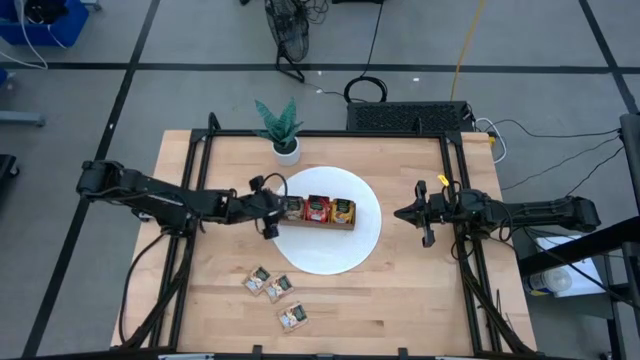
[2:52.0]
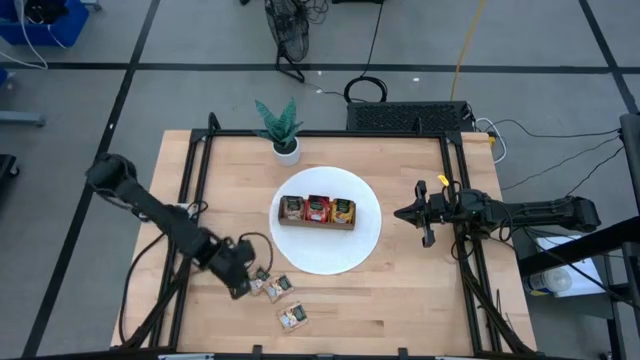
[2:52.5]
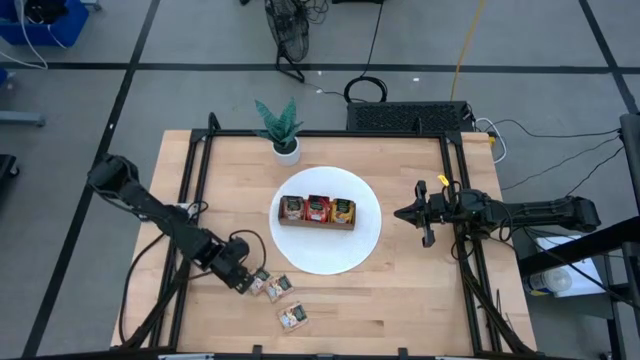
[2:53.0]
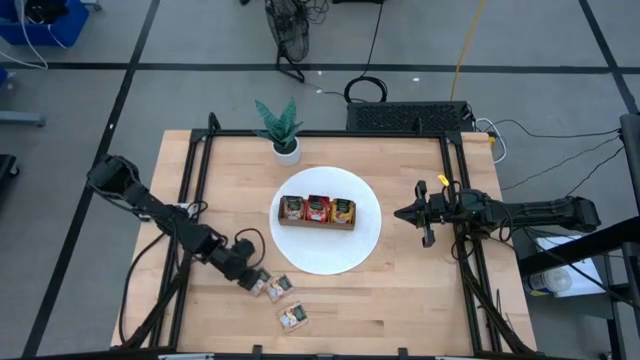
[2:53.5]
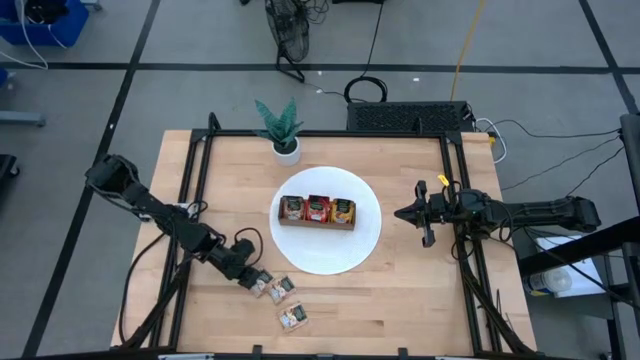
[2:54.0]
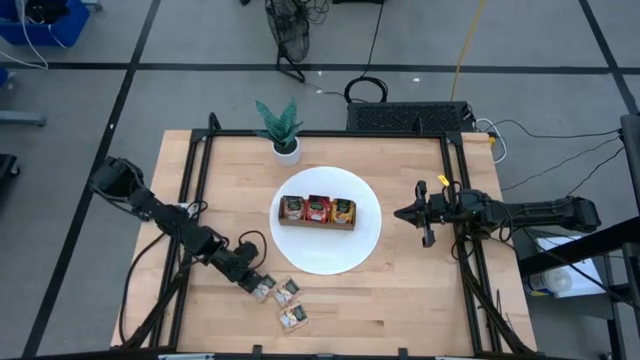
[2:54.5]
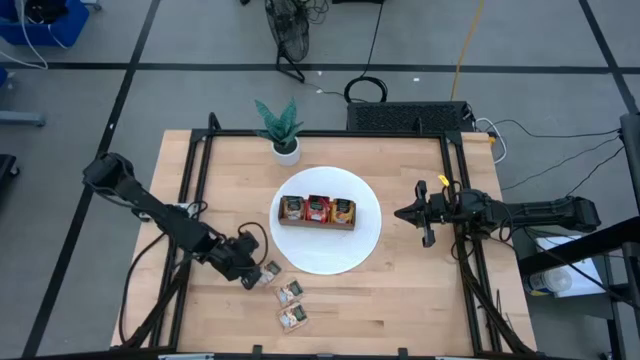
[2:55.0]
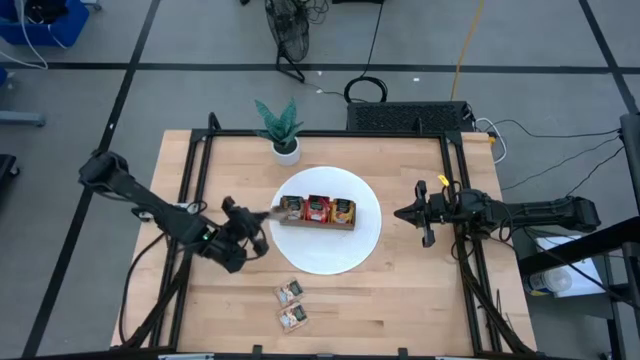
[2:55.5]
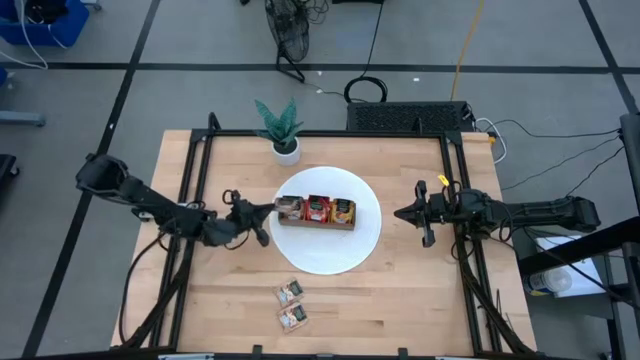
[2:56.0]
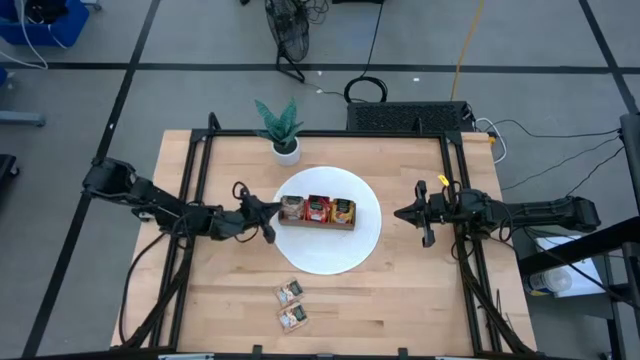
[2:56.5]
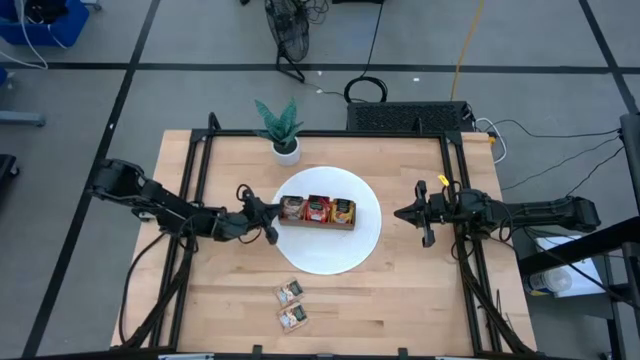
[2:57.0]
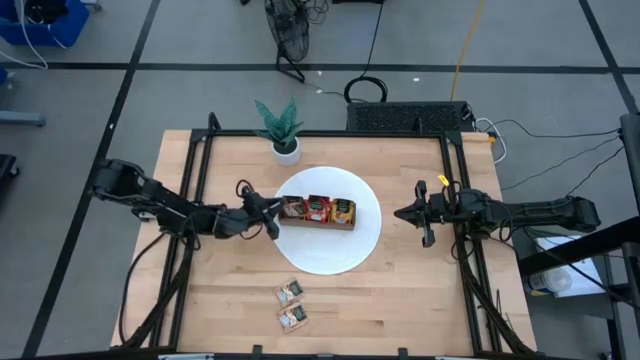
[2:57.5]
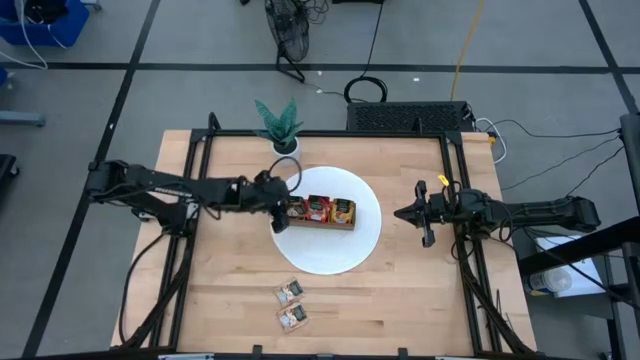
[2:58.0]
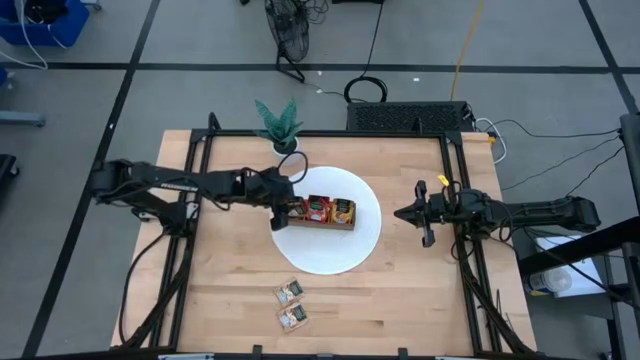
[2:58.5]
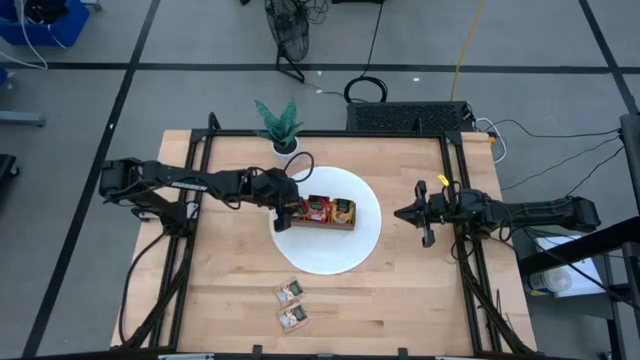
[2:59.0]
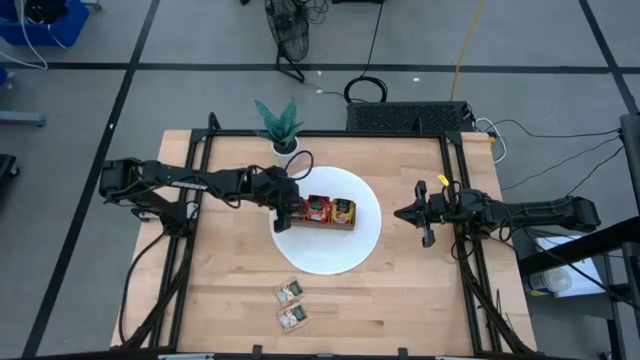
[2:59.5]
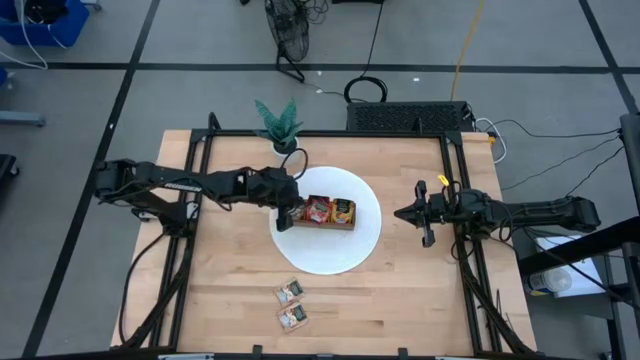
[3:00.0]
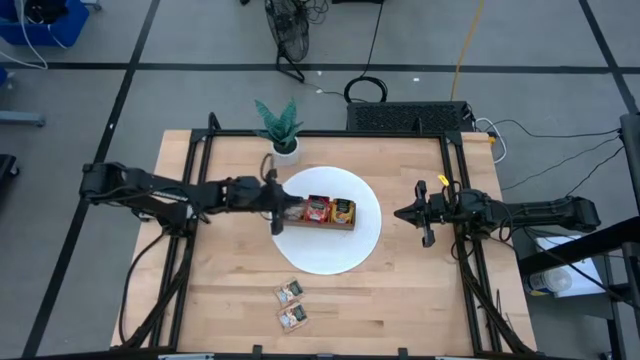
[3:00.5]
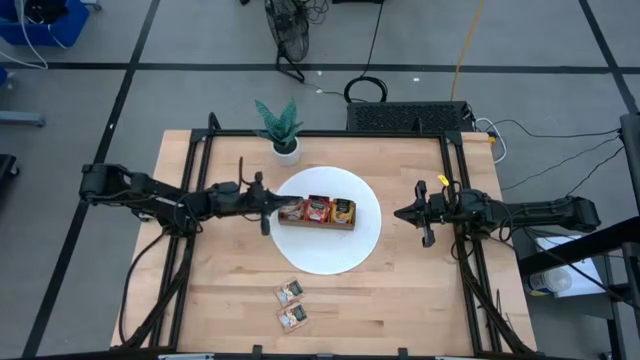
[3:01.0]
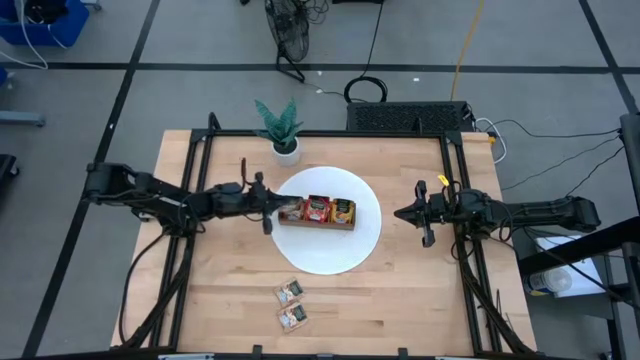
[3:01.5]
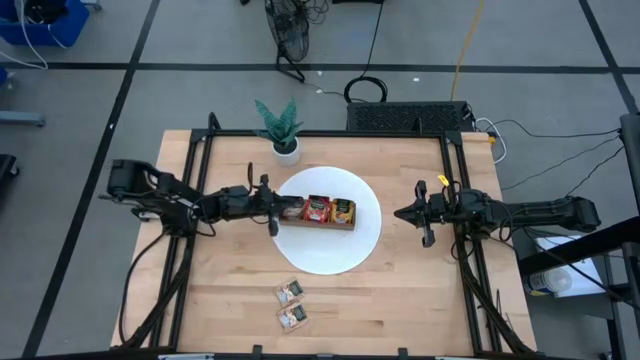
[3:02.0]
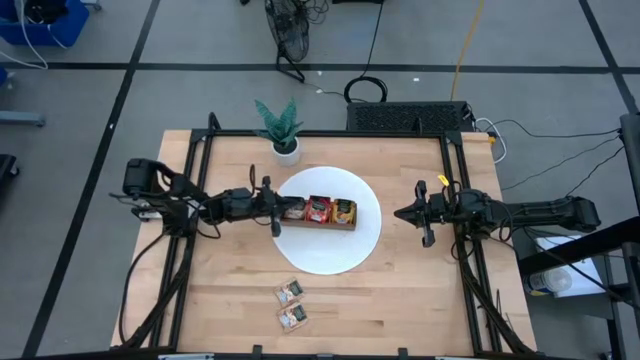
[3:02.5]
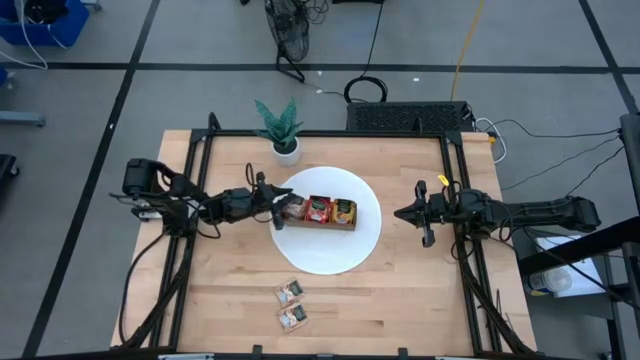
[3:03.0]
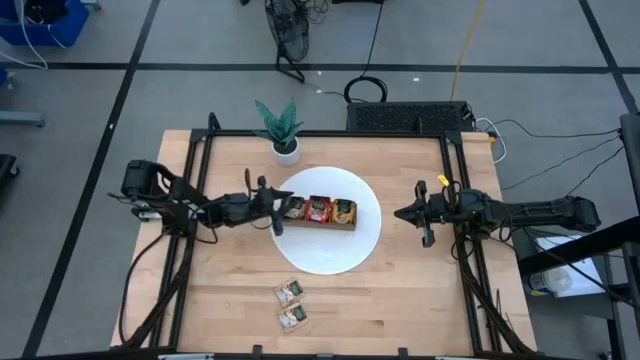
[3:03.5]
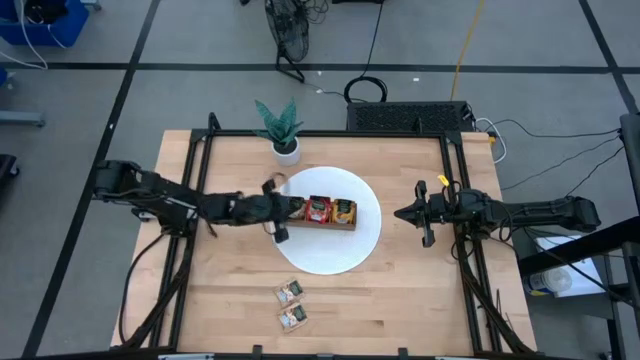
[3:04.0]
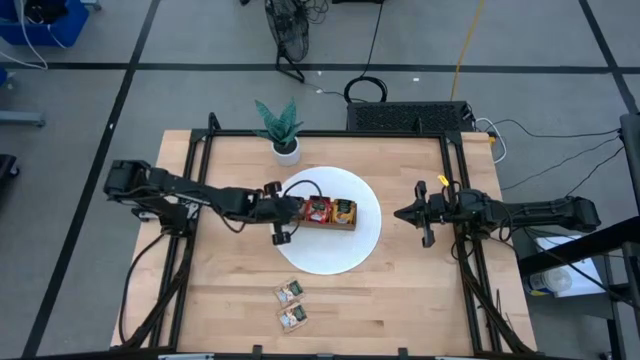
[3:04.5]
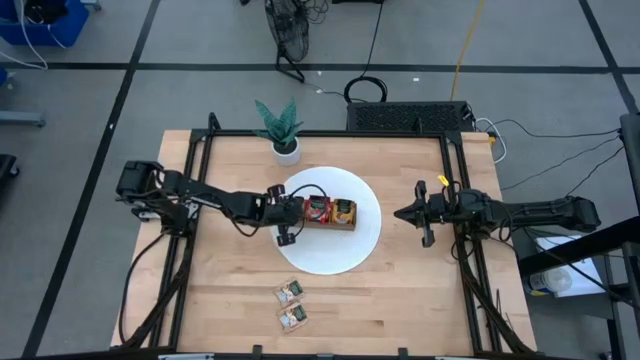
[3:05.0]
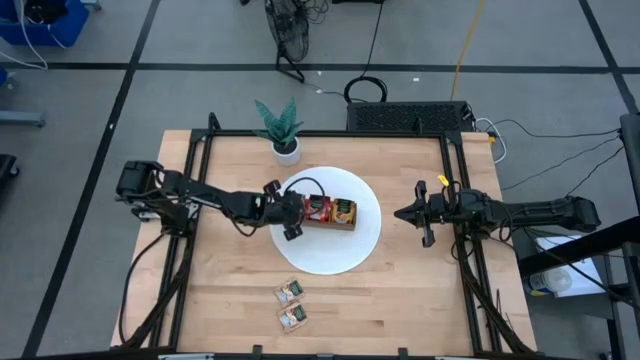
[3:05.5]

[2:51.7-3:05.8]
Task: Pick & Place Tea
Put the brown tea bag into the left section of the wooden organizer

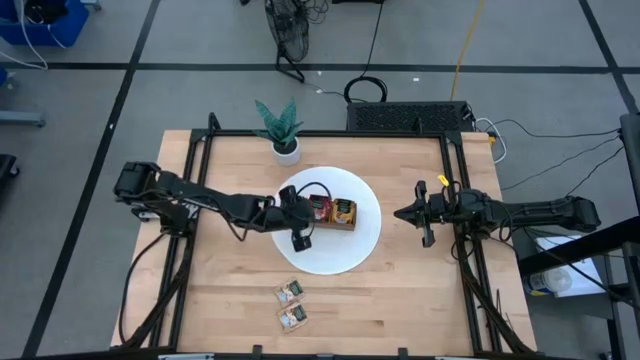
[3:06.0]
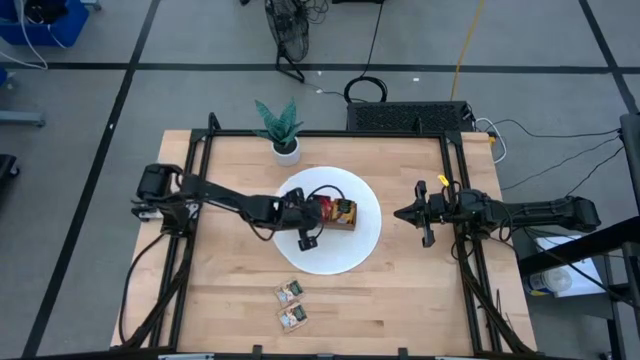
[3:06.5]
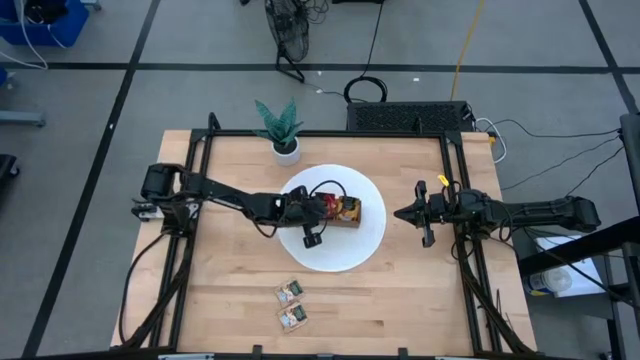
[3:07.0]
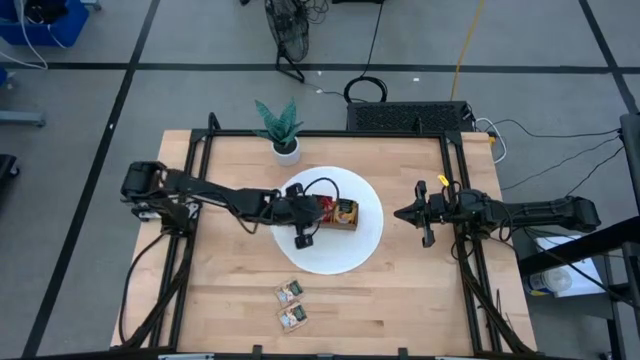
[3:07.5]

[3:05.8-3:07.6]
Adjust the red tea bags in the middle section of the wooden organizer

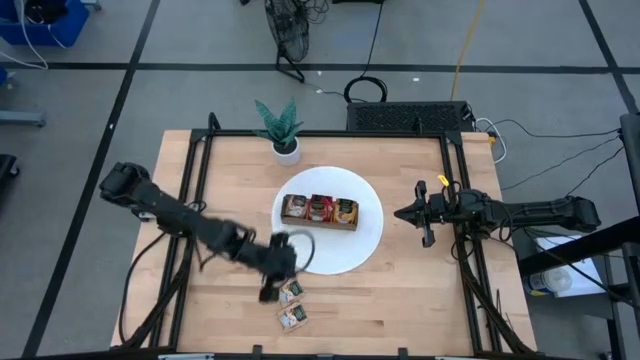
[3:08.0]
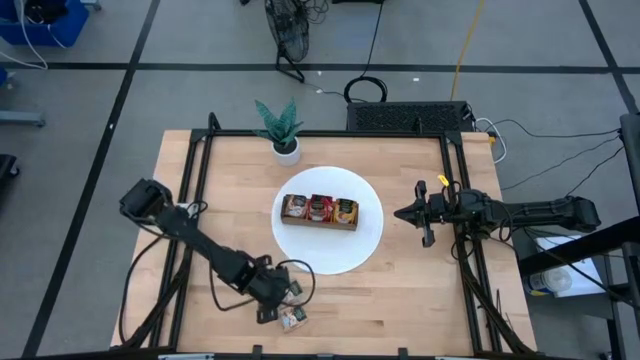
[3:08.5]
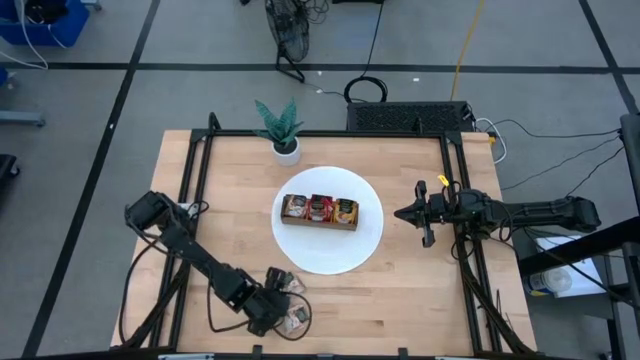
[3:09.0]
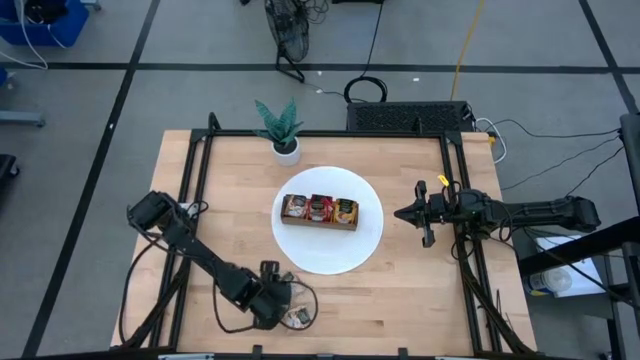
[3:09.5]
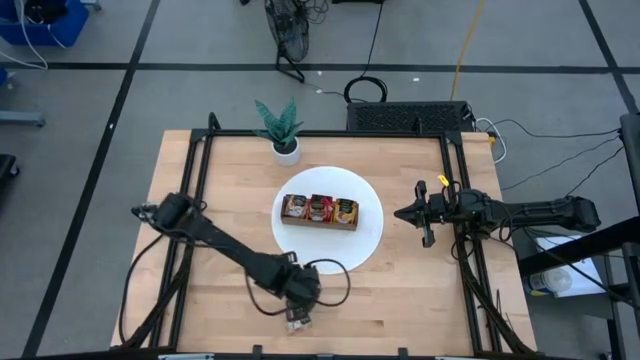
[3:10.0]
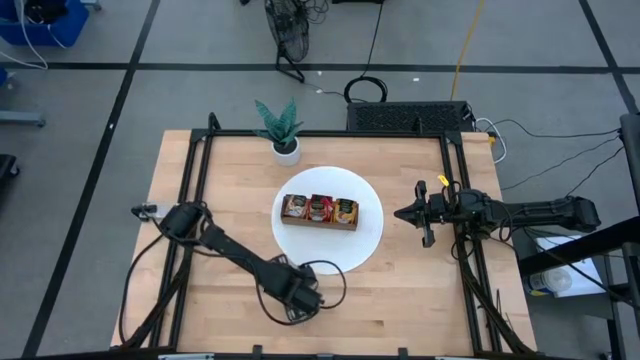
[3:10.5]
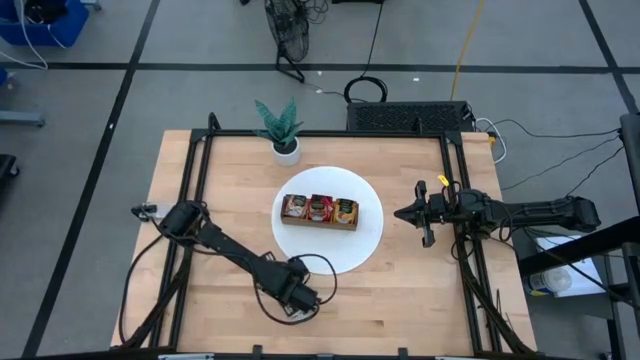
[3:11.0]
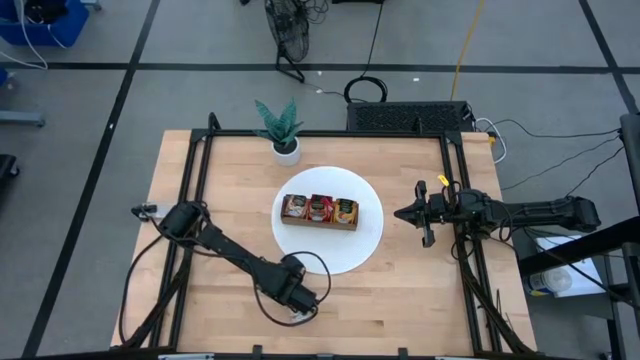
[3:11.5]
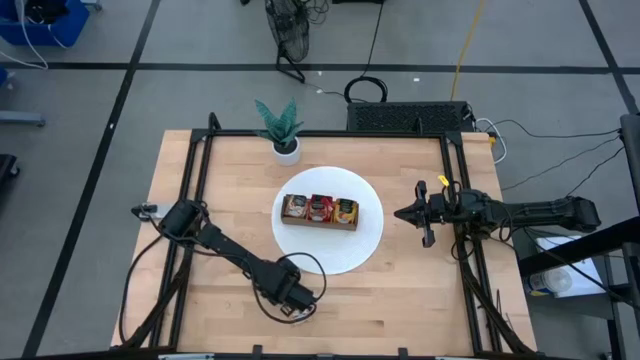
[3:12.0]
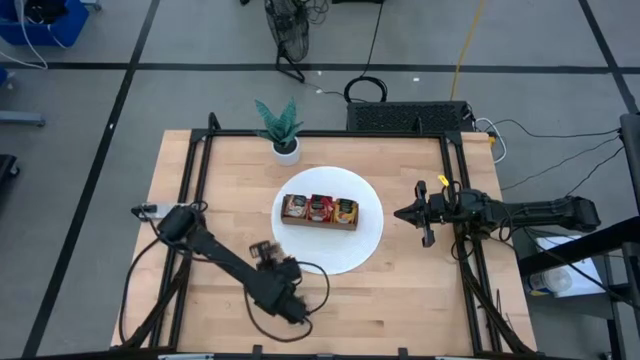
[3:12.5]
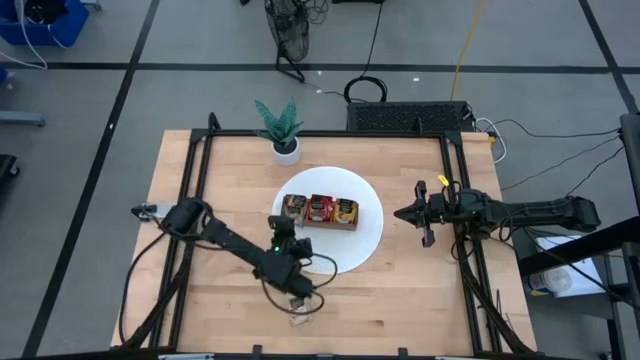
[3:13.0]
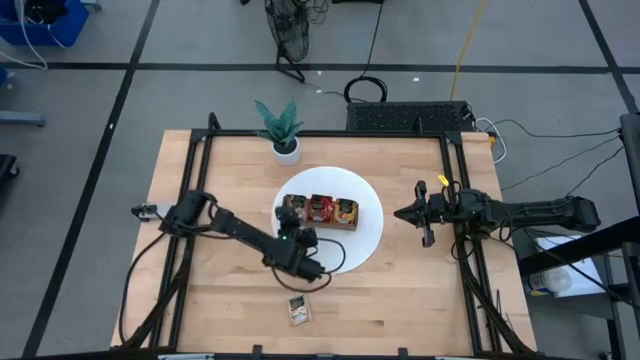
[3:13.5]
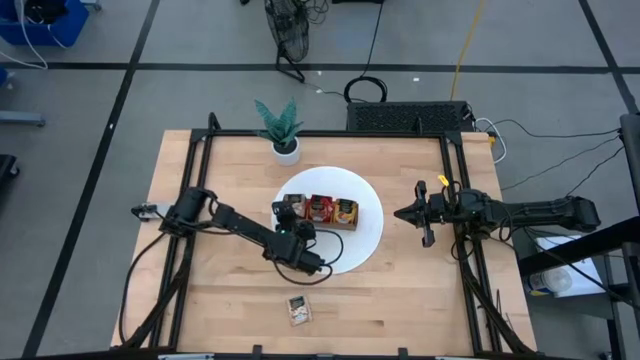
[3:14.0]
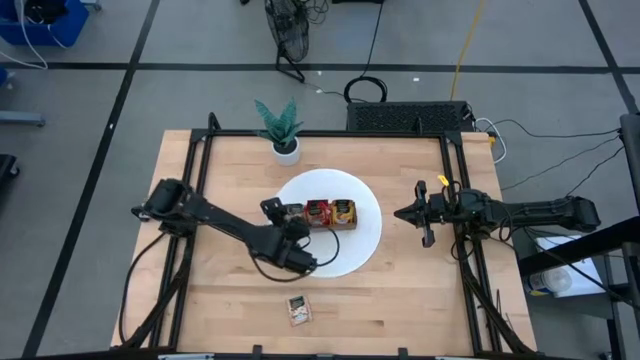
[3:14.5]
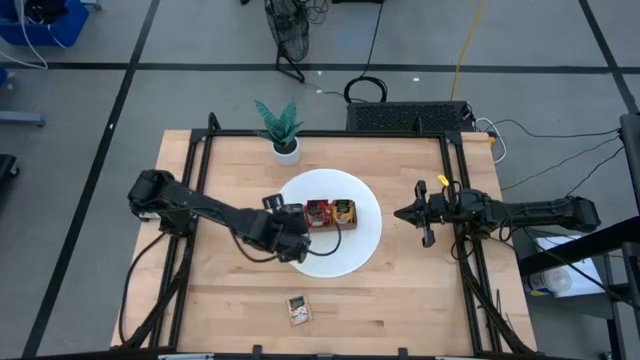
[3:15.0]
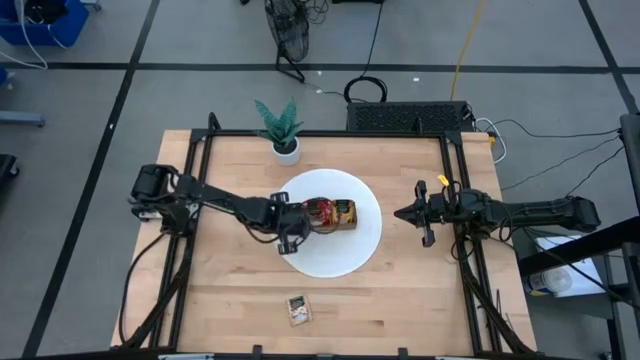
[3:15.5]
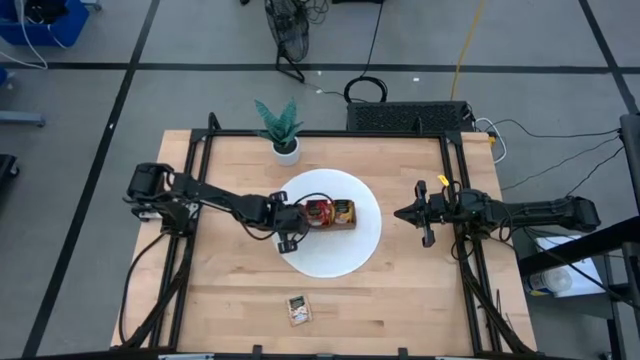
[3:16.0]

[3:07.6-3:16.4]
Put the brown tea bag into the left section of the wooden organizer
